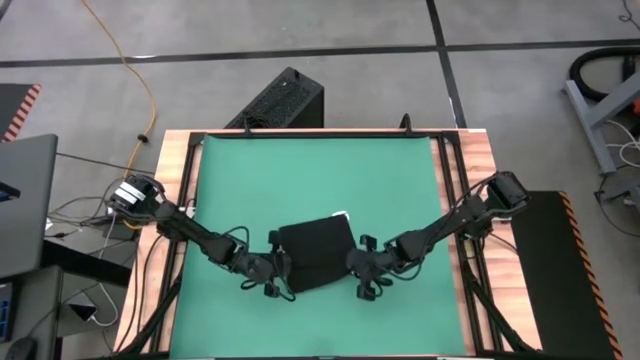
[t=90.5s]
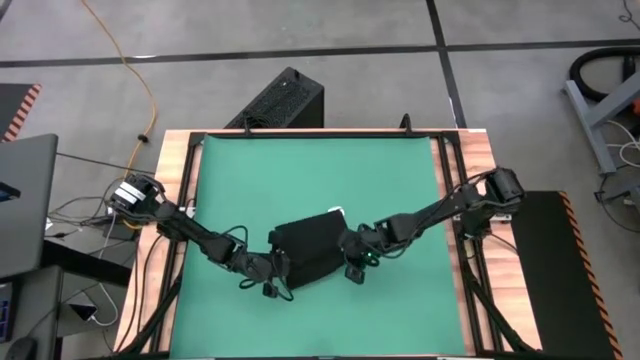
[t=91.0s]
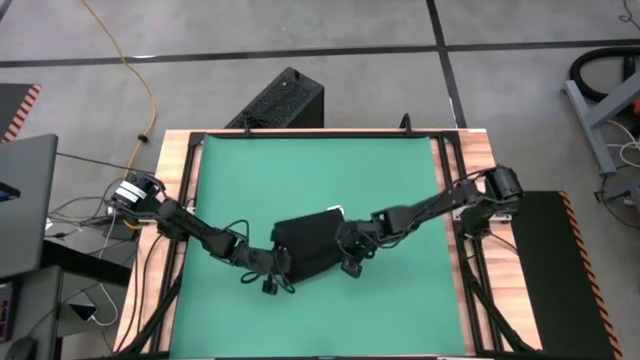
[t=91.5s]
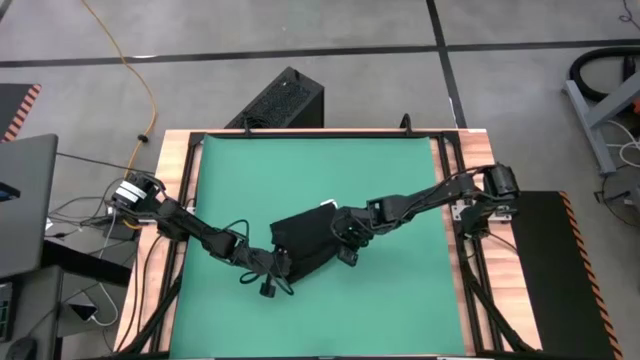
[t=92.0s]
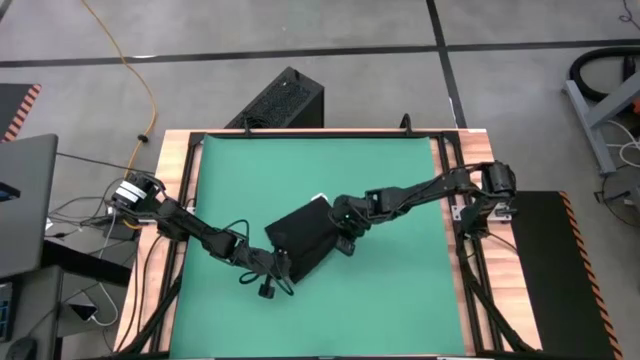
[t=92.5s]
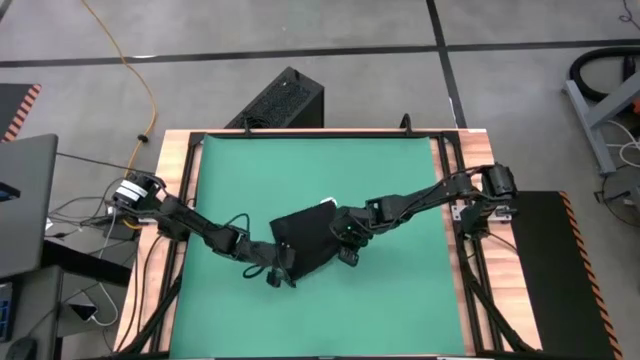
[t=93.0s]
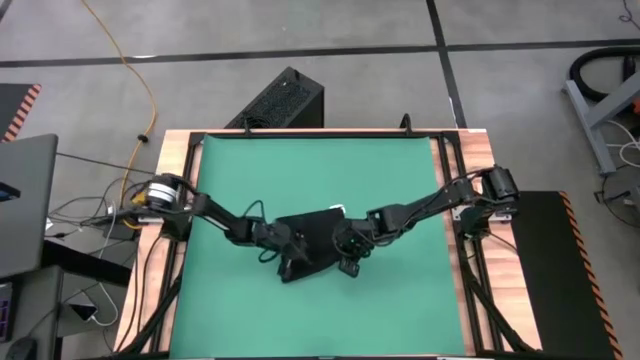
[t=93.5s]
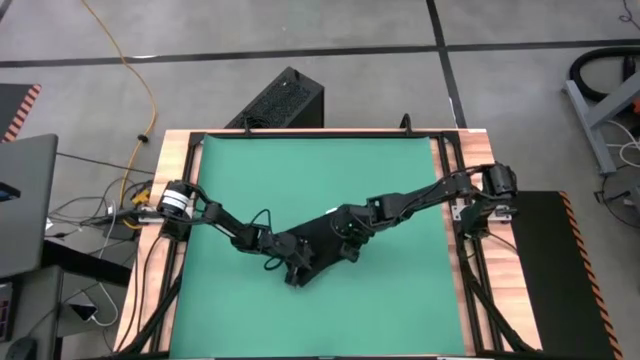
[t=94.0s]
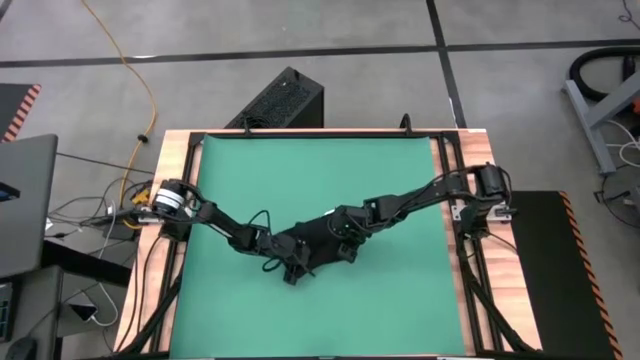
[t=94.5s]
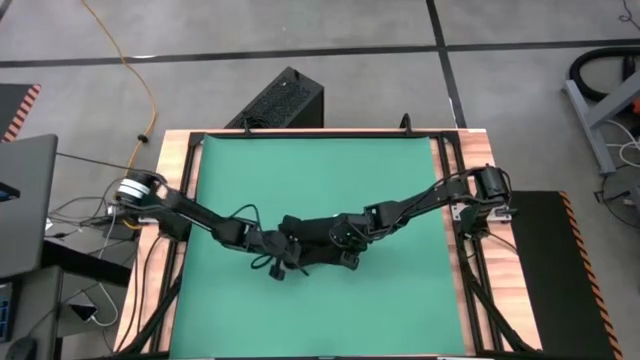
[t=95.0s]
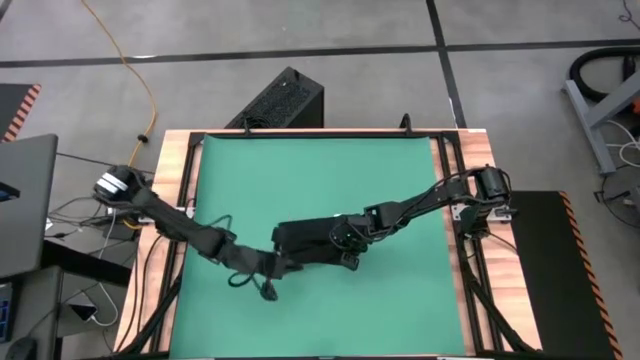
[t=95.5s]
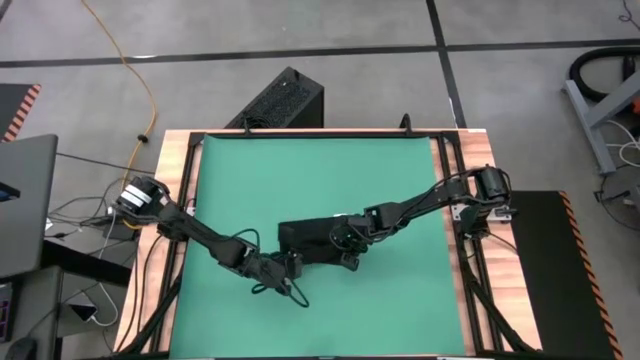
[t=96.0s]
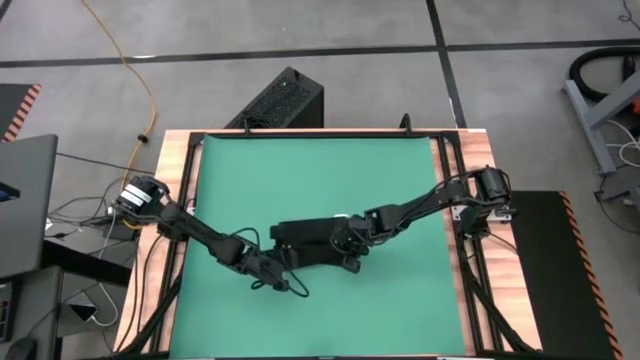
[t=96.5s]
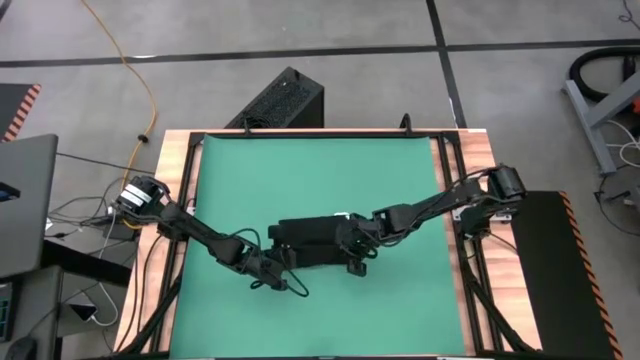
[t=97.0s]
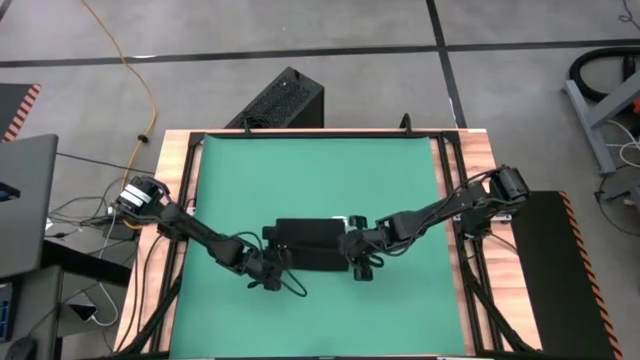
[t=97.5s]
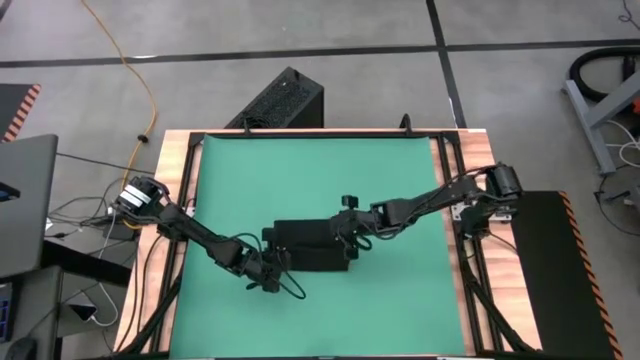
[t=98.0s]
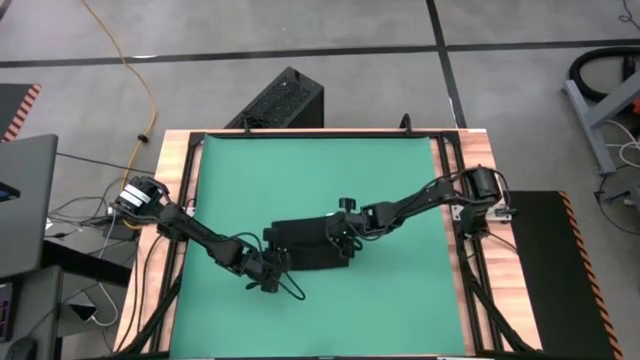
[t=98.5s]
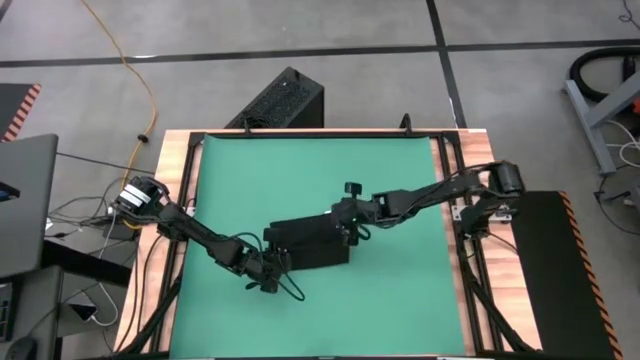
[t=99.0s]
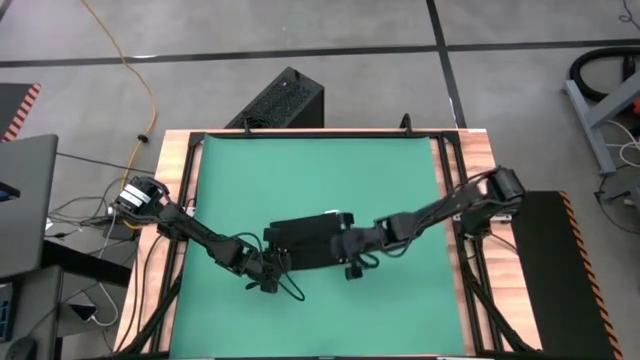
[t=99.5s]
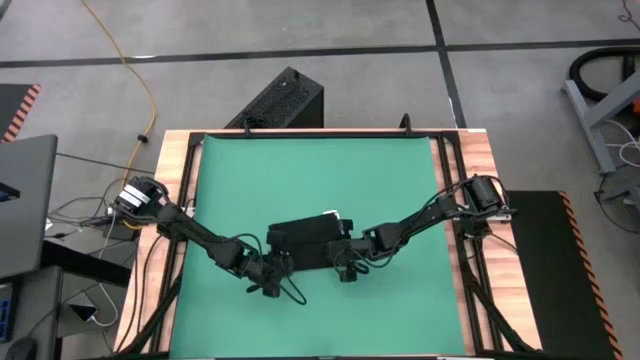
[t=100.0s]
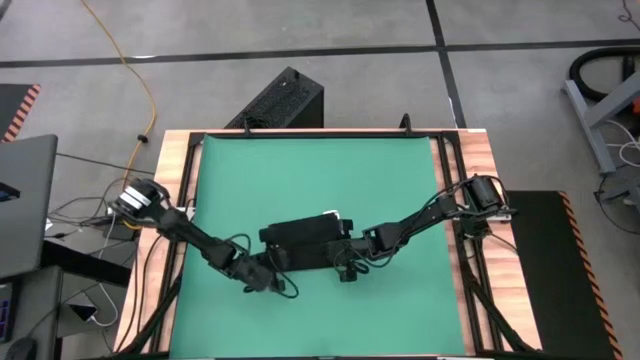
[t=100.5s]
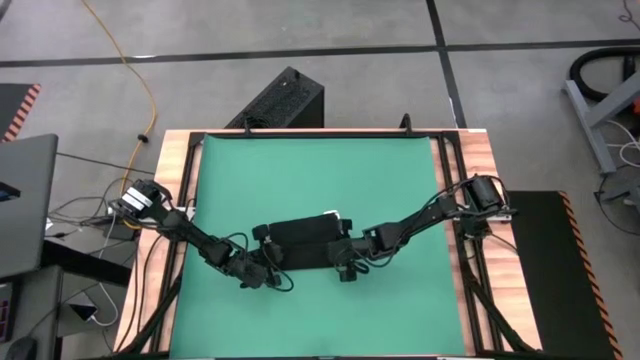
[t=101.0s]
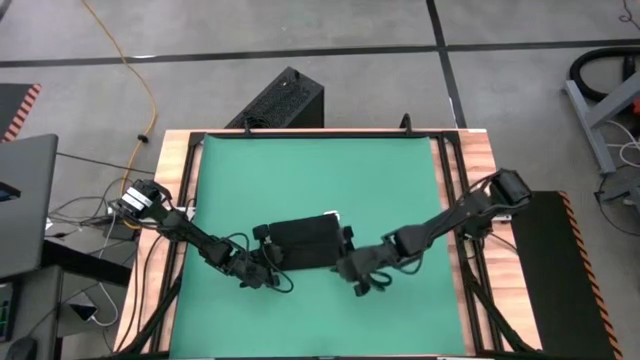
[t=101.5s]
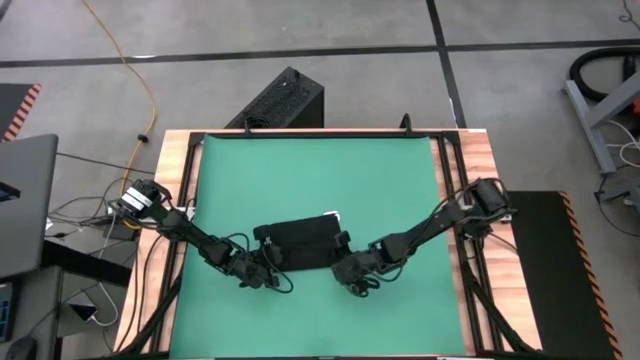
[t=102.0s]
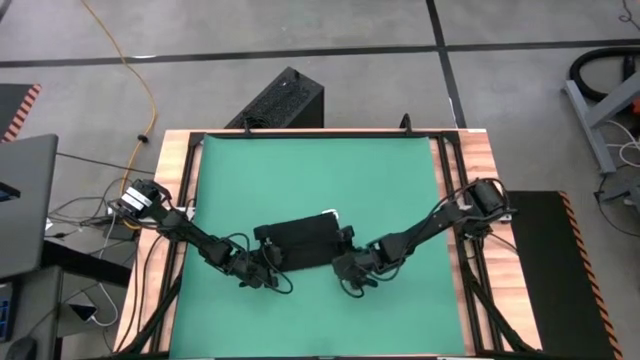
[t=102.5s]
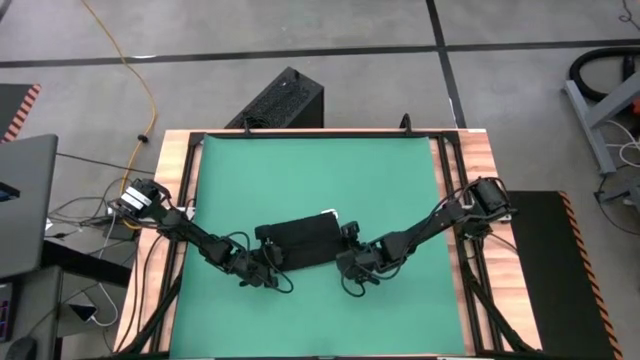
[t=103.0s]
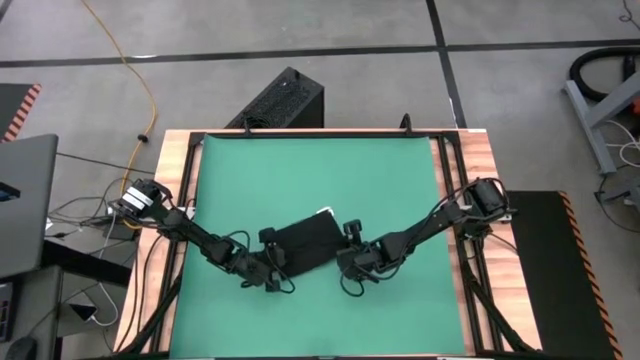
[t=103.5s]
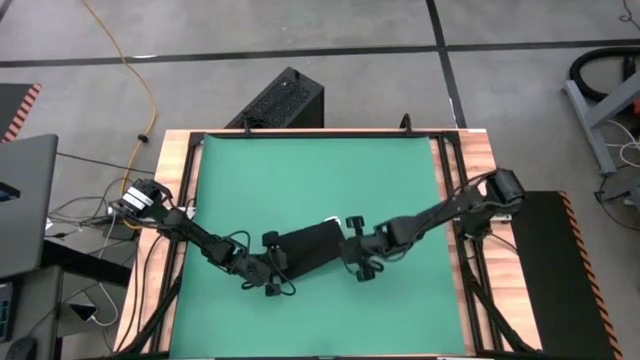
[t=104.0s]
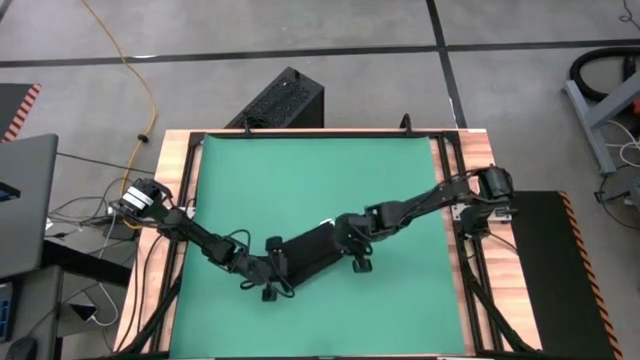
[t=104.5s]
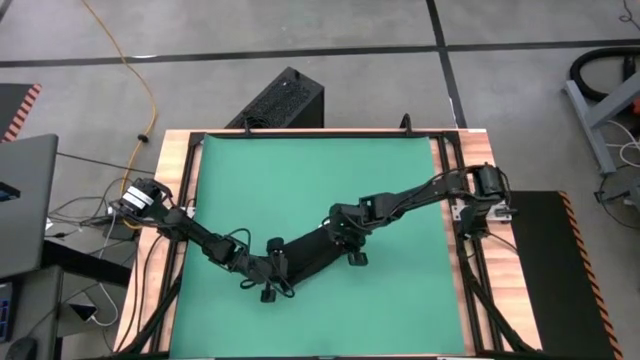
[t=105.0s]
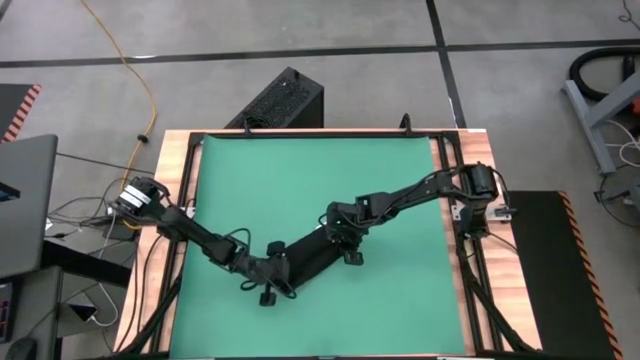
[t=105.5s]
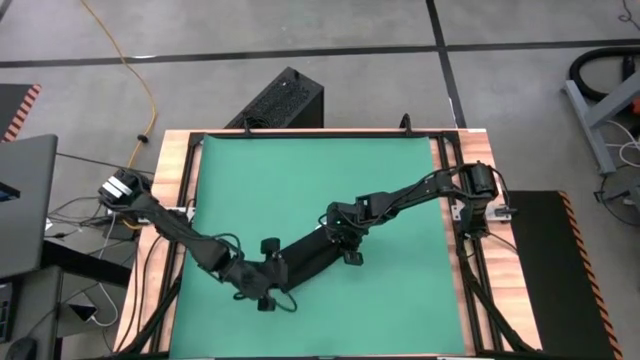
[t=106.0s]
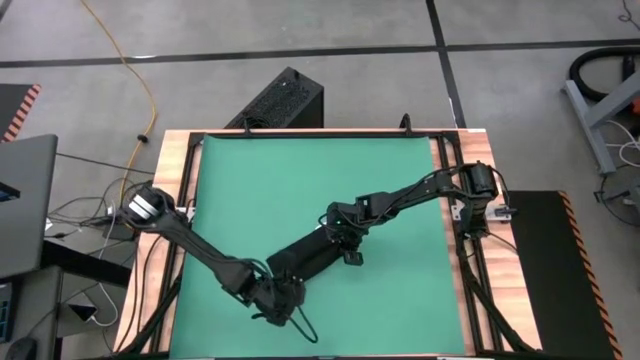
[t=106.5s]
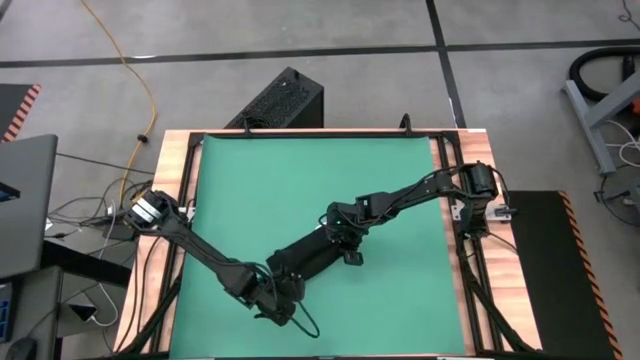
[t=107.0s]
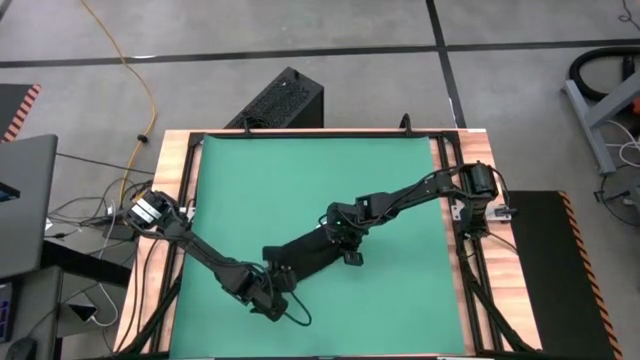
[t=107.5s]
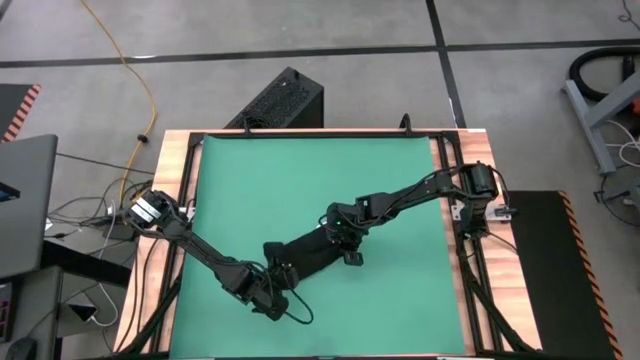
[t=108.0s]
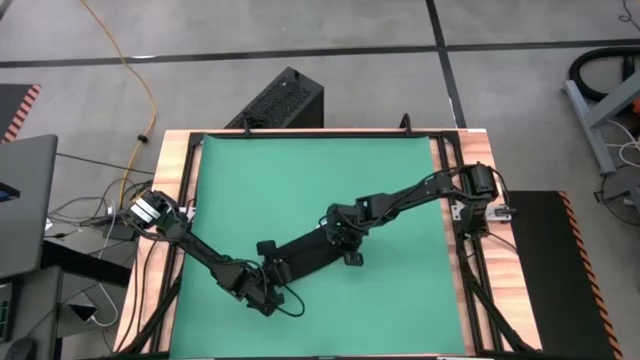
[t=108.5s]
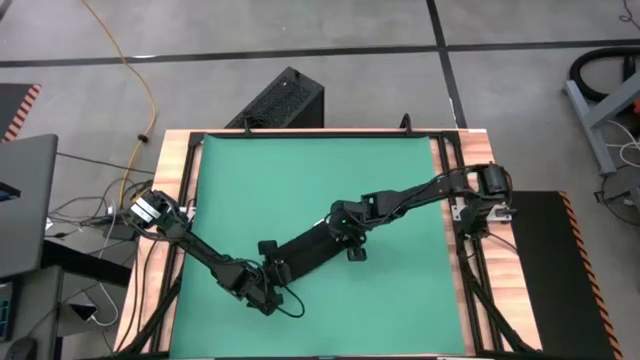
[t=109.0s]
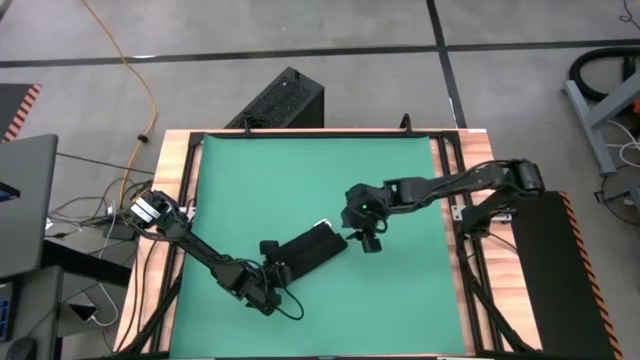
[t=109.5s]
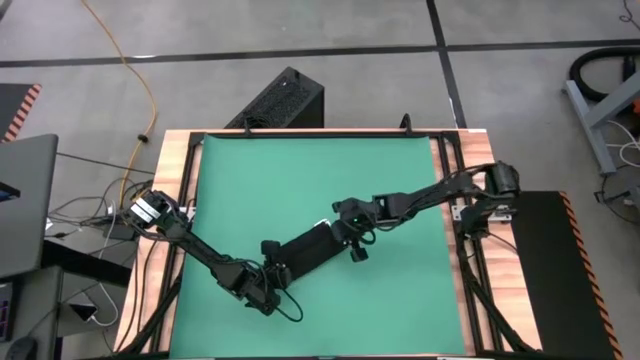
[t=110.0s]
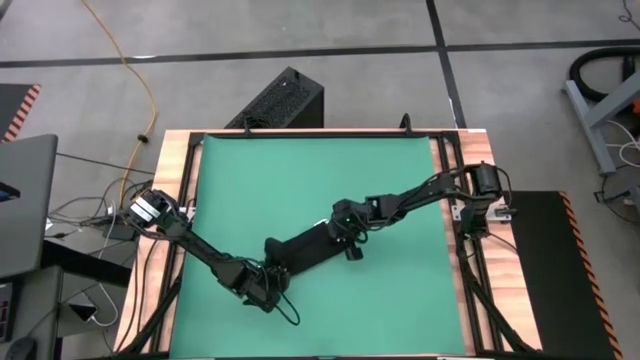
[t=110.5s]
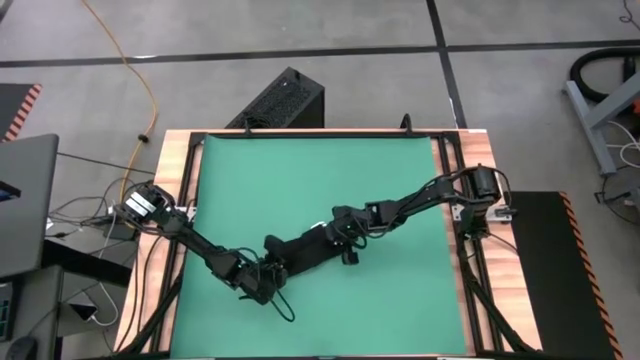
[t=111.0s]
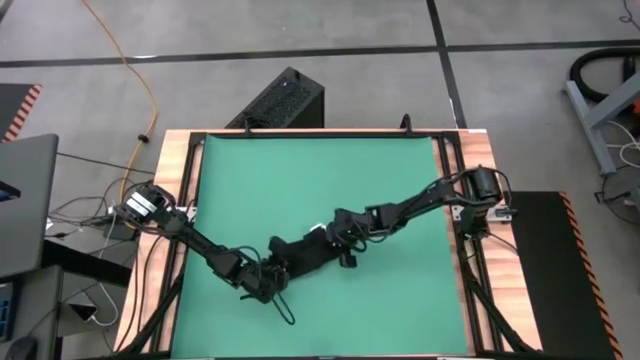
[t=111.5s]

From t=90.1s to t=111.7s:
Task: Roll towel into tight, uniform cylinder
Roll the black towel
